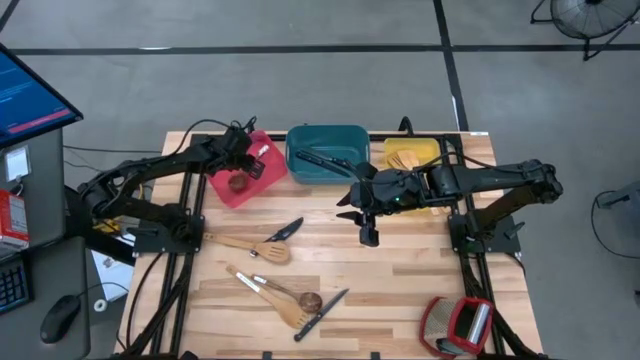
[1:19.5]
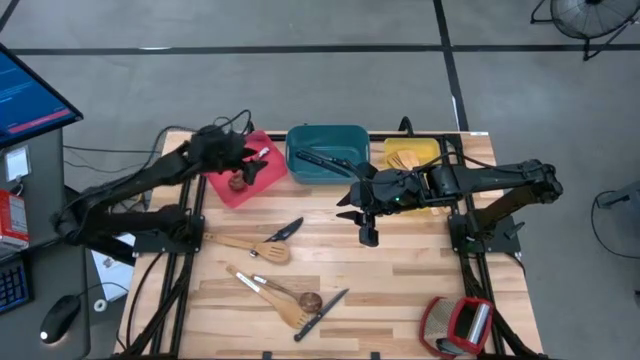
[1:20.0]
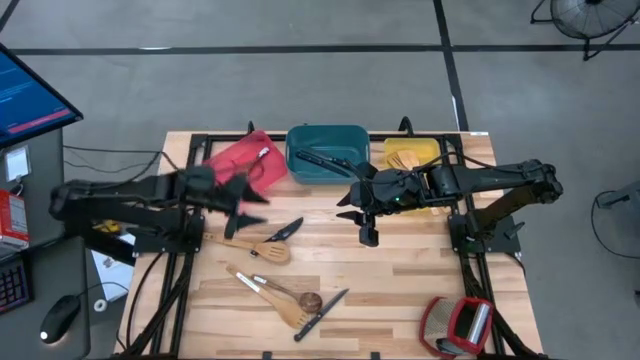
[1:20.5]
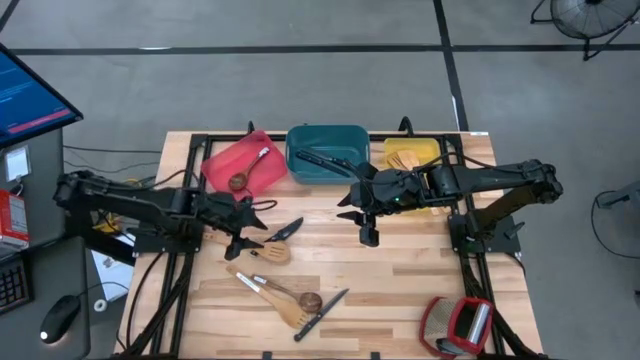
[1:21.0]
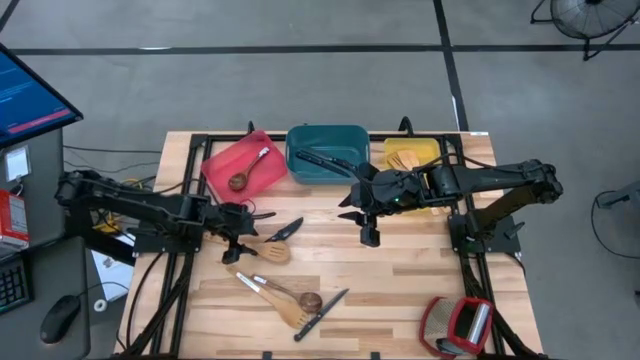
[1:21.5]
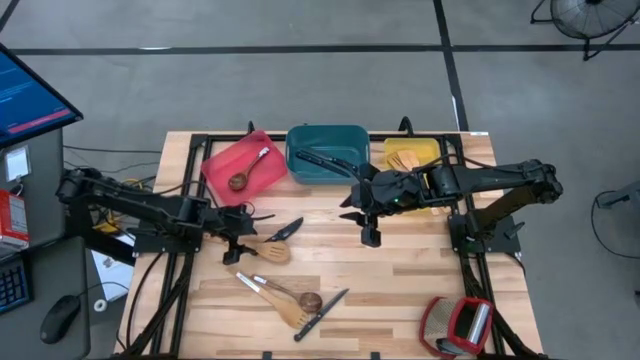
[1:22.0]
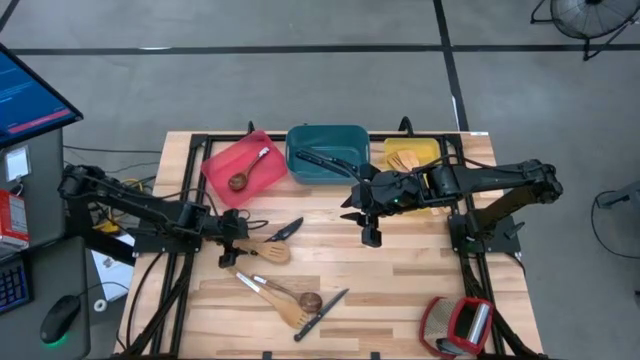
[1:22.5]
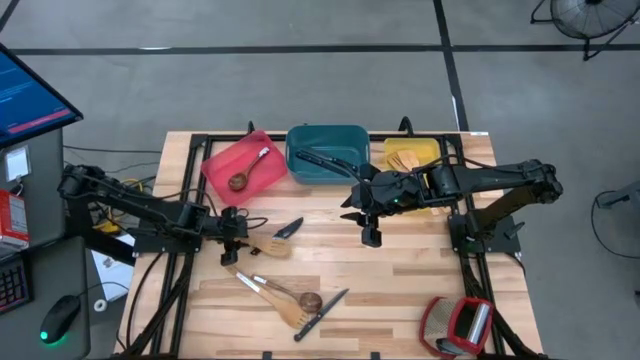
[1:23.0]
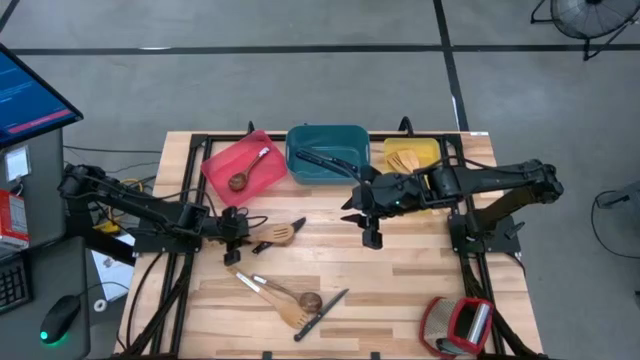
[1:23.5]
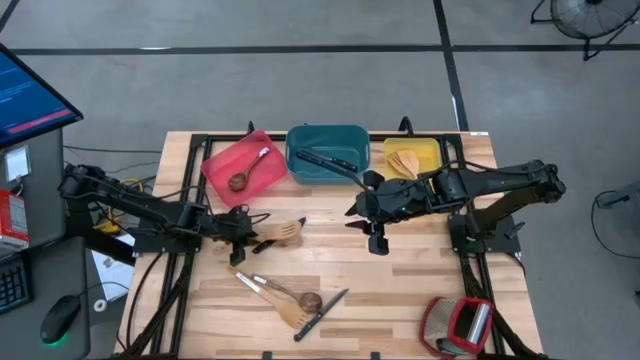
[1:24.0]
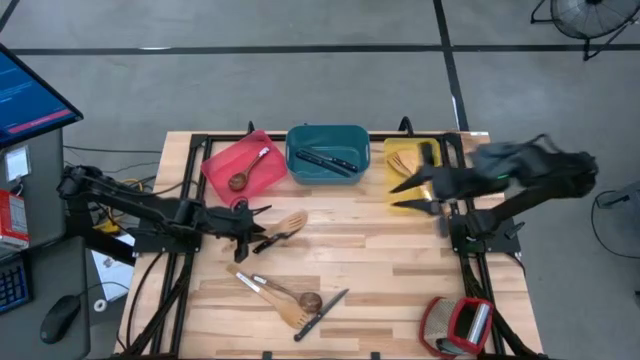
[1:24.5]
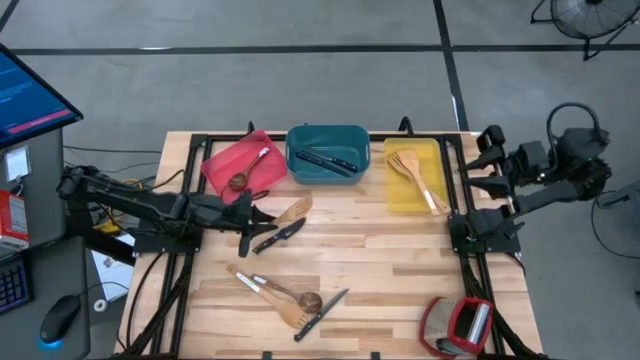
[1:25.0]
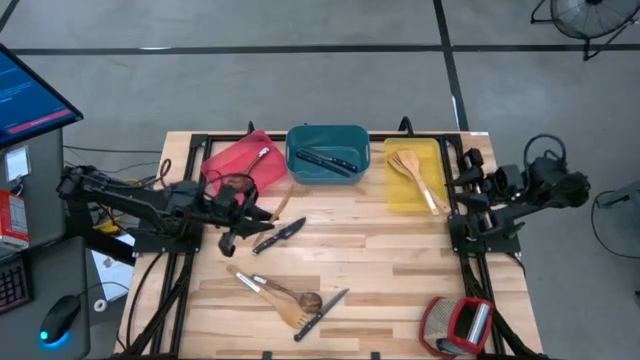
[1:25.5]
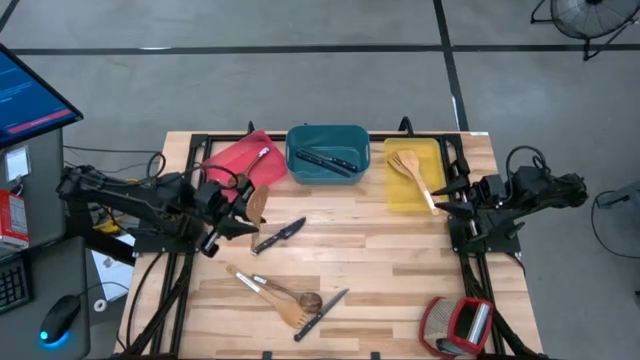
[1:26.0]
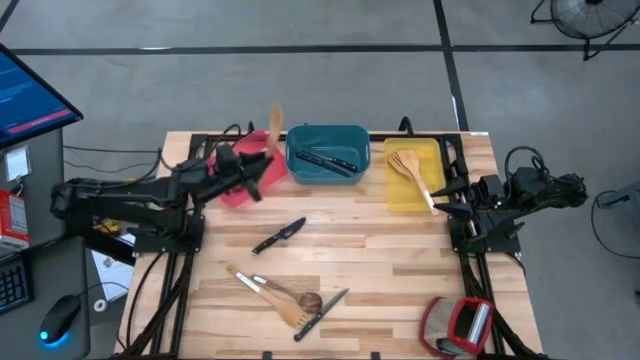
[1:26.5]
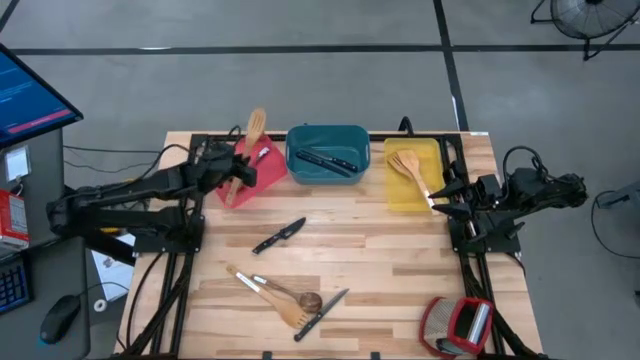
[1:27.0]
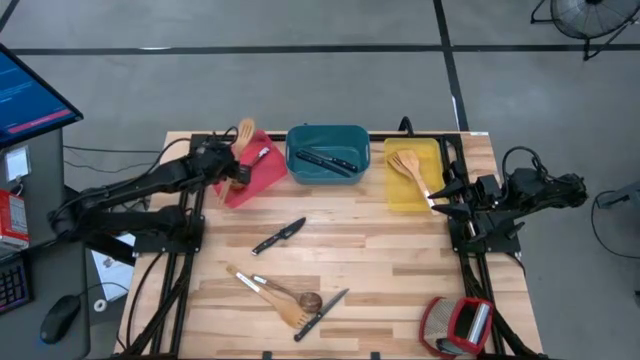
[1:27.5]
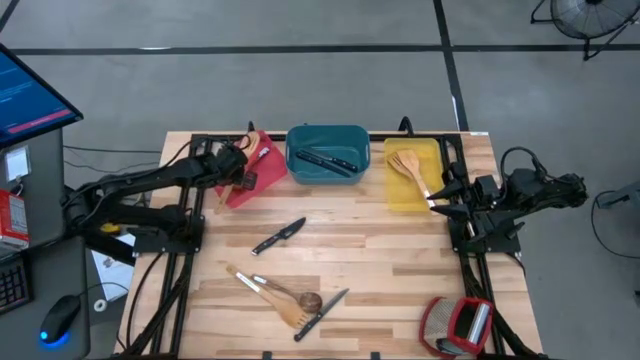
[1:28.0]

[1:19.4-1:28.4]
Task: Pick & Place Kitchen Items
Put the wooden slotted serving spoon into the red bin

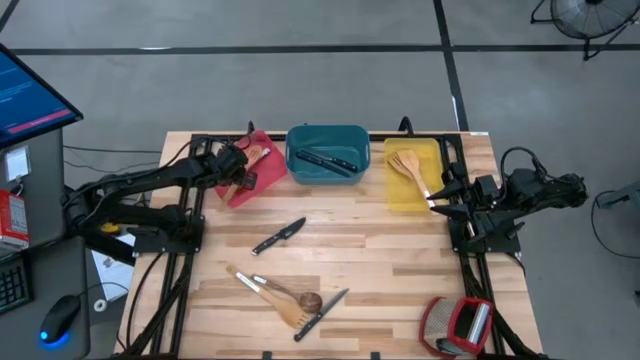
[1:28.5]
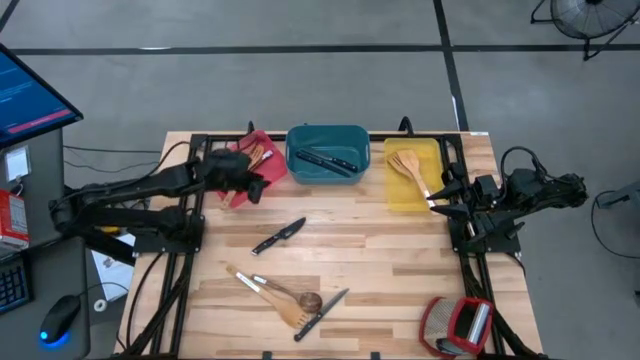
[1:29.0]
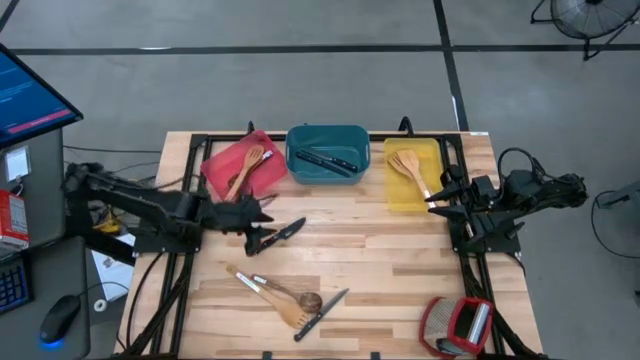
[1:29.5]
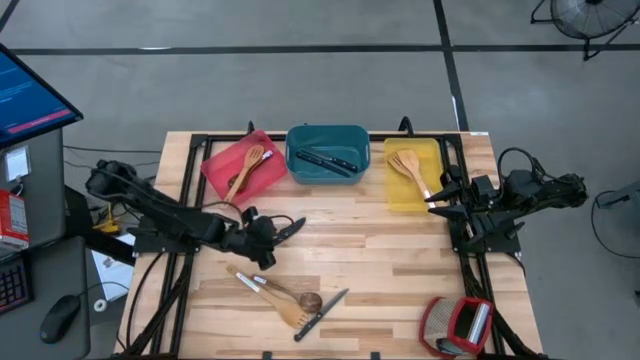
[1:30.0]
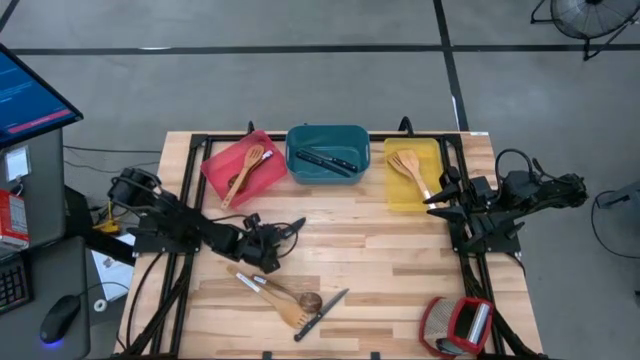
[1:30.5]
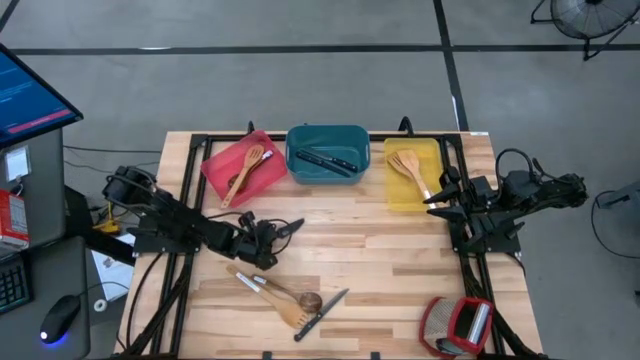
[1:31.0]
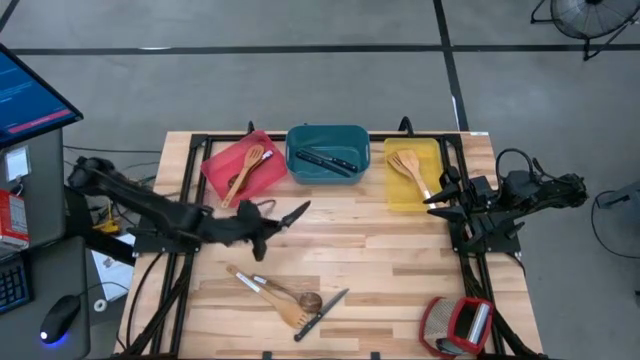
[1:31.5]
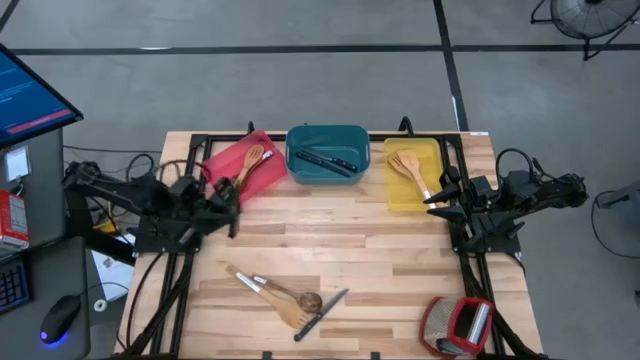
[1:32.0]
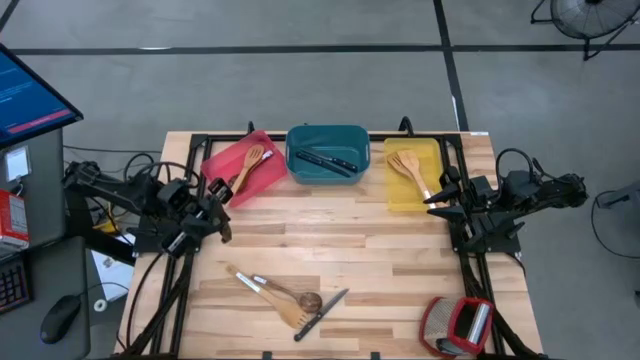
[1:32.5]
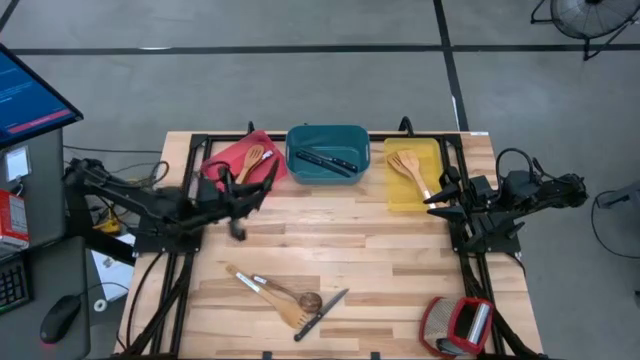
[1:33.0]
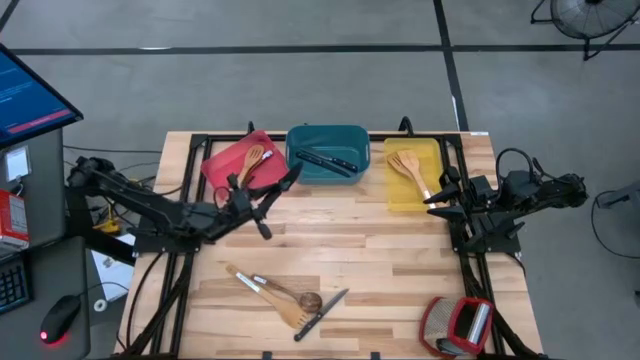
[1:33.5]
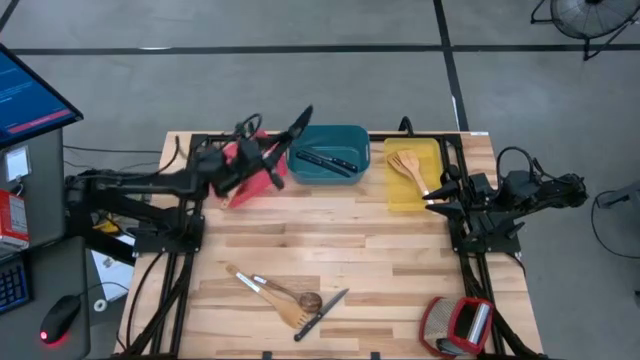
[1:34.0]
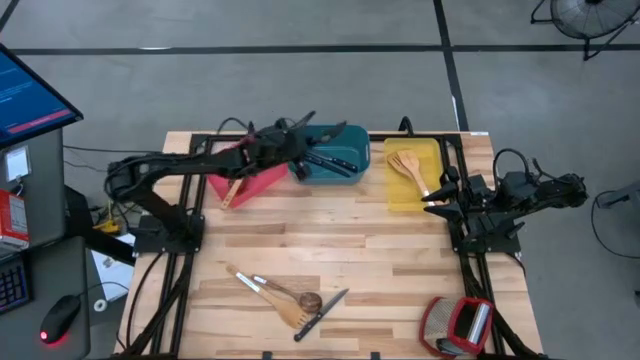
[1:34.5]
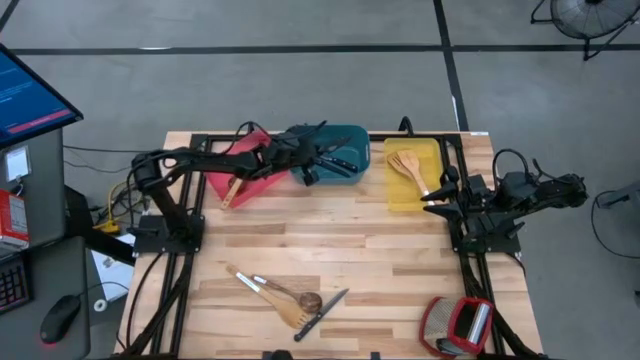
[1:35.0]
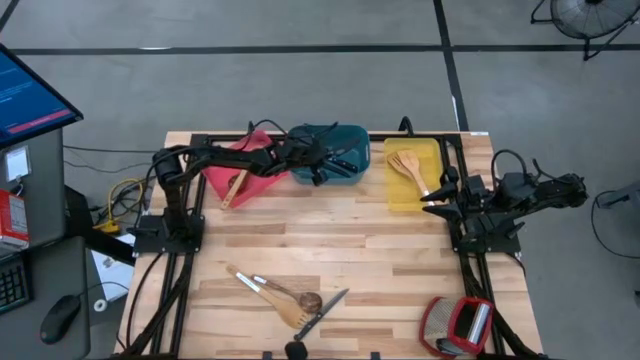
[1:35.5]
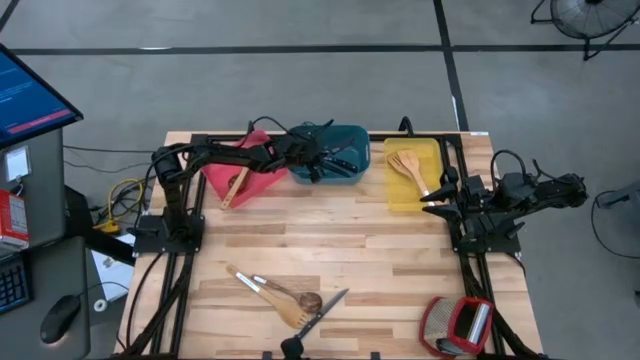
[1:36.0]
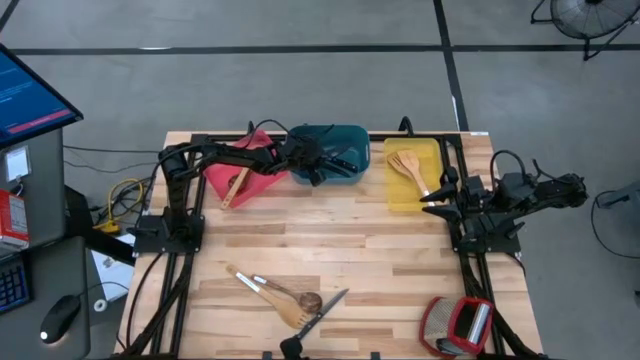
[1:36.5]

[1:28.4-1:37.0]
Put the black knife into the blue bin

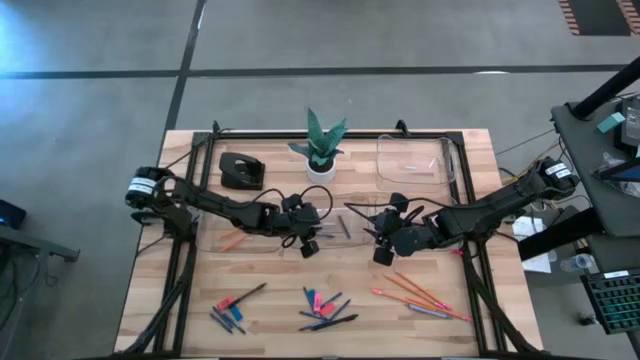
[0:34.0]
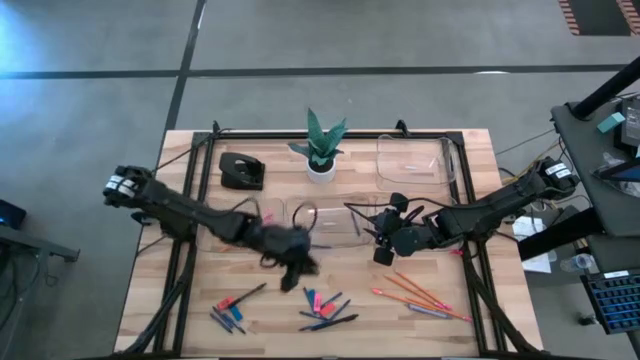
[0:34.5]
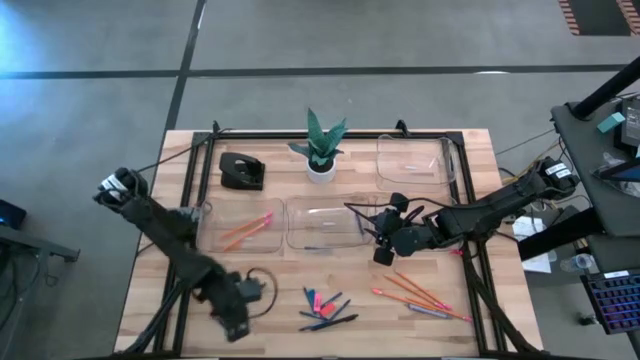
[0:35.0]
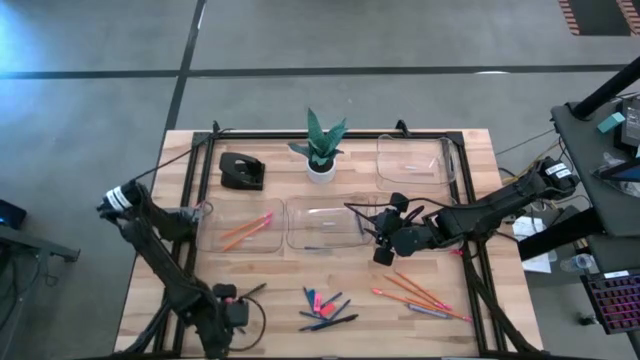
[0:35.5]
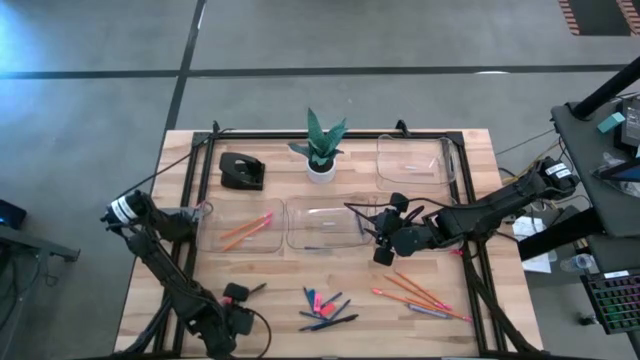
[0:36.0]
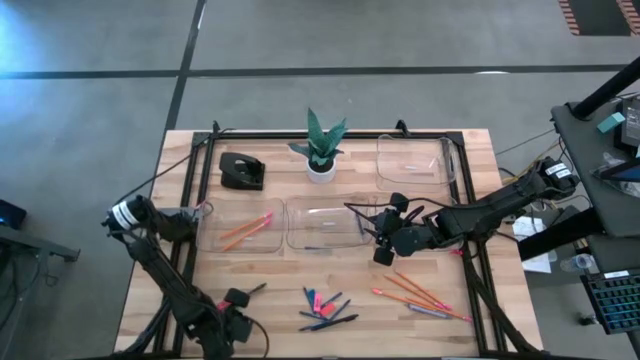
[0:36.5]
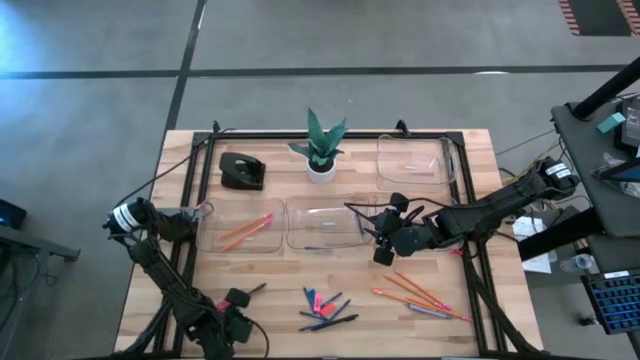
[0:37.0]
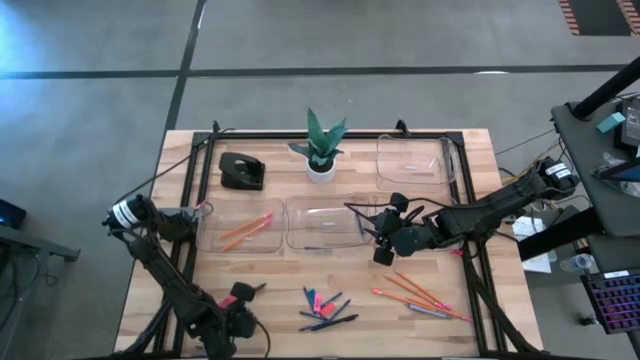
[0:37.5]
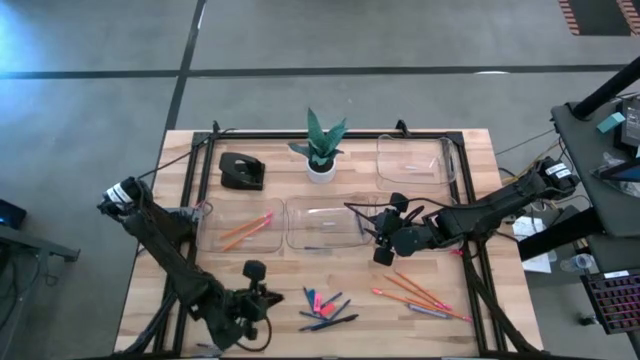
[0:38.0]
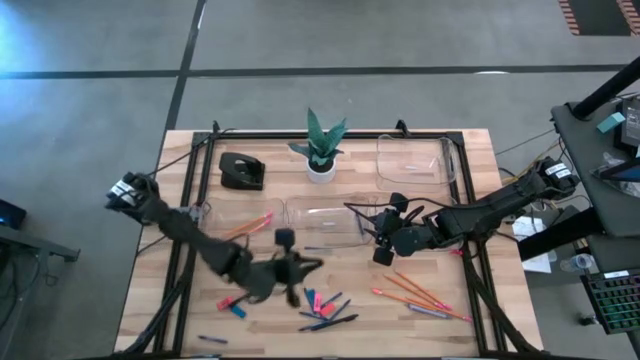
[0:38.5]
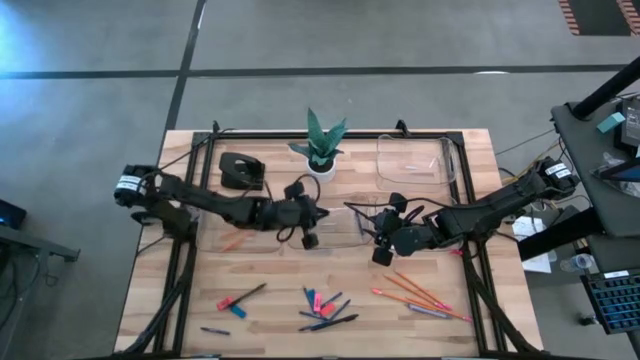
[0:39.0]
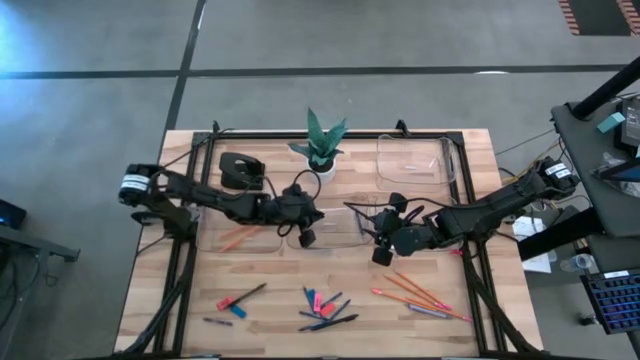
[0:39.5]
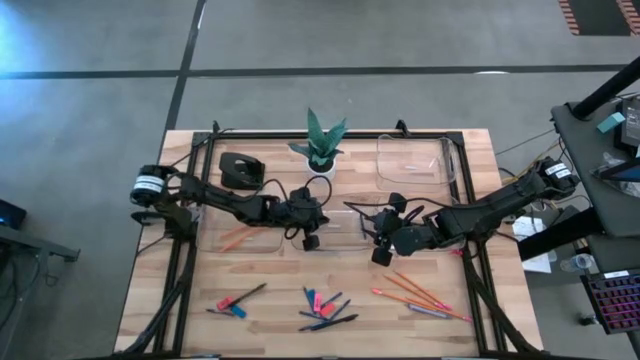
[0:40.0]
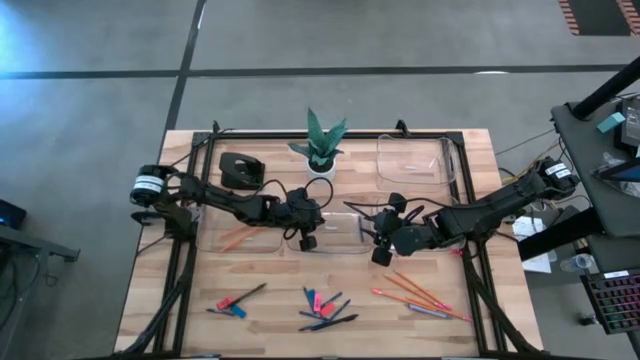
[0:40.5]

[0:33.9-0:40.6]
Task: Sort crayons/erasers/pens/pencils in bins
Put the blue crayon into the middle transparent bin
